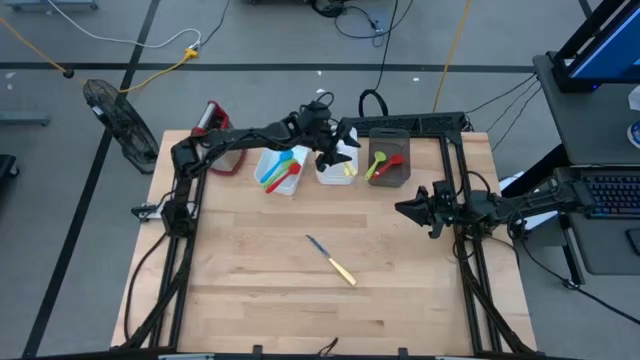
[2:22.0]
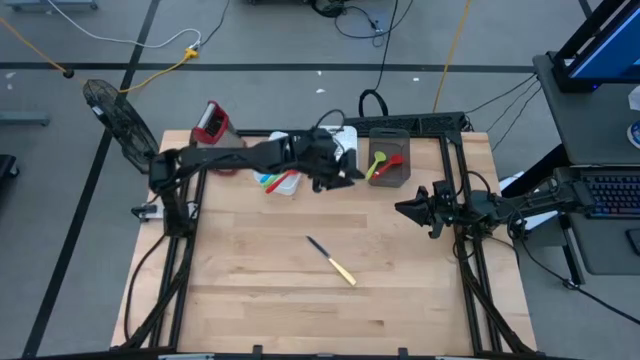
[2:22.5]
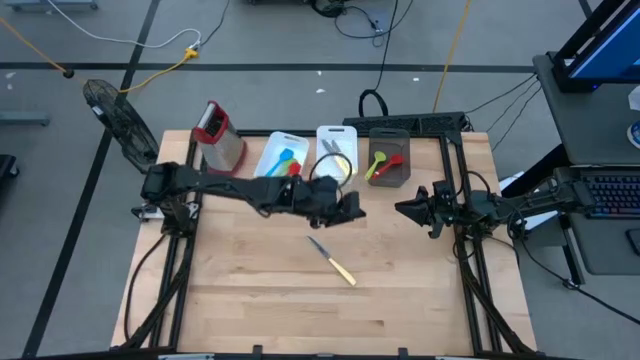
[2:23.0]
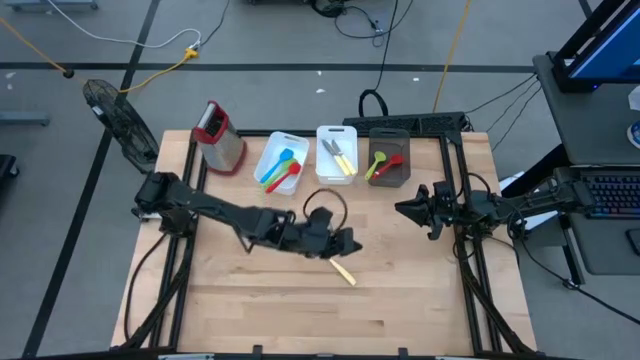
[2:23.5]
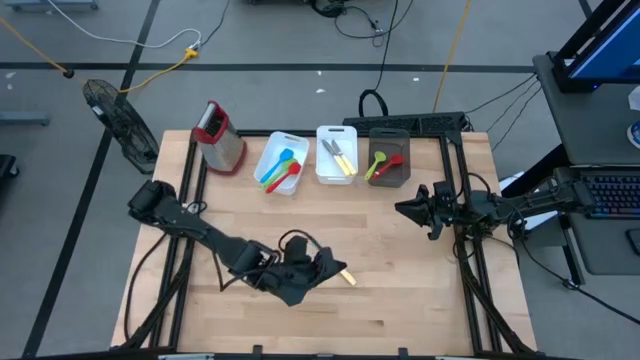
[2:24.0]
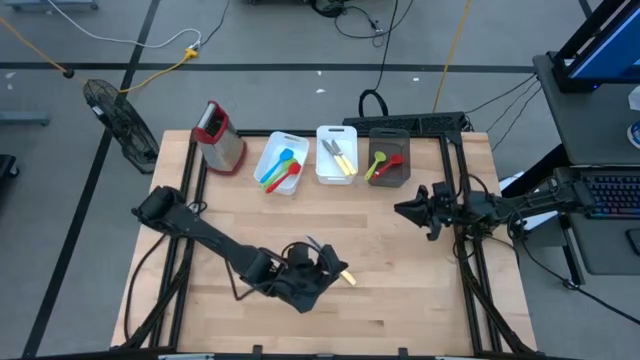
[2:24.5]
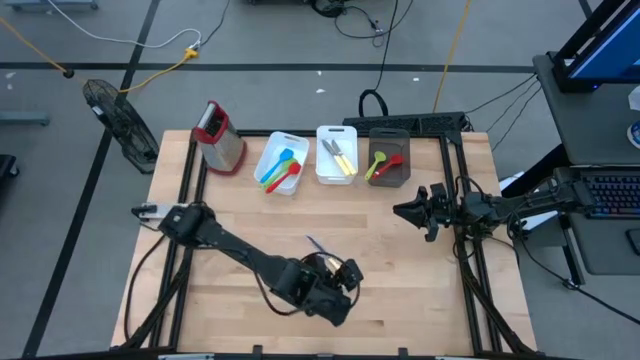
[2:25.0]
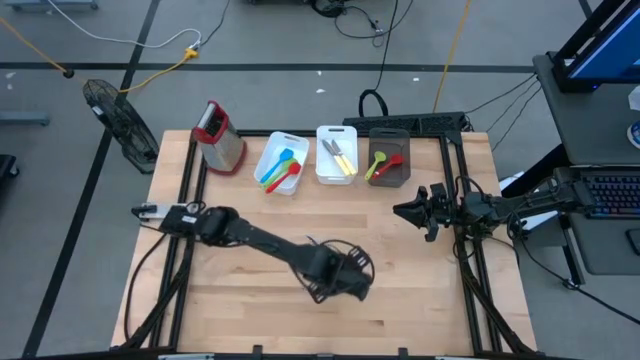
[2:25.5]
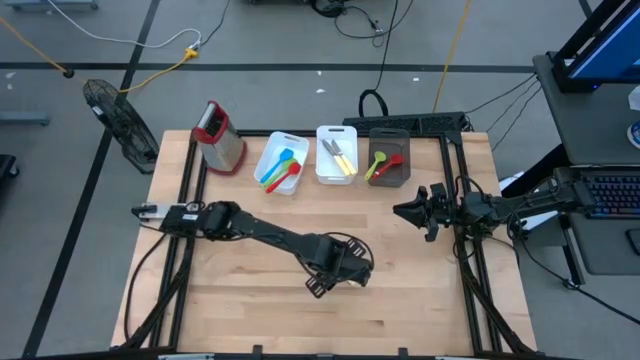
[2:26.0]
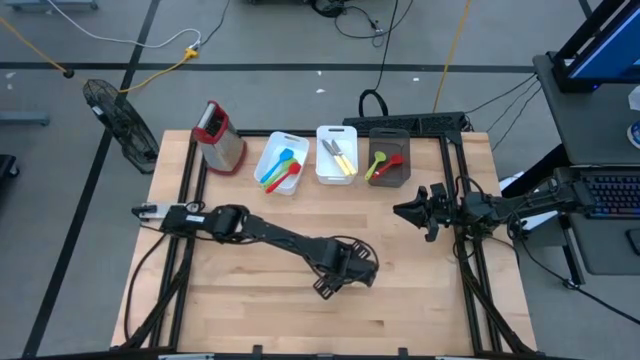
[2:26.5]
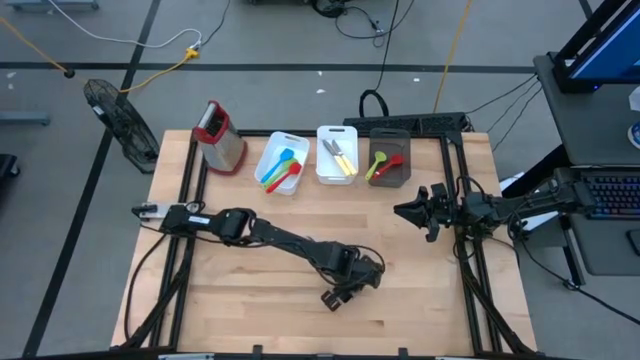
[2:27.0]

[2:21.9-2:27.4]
Task: Pick & Place Kitchen Items
Put the yellow knife into the right white bin

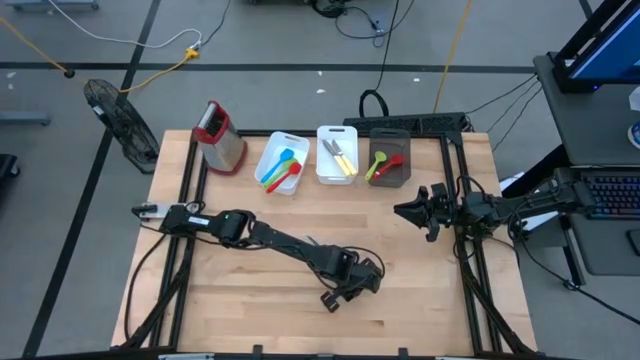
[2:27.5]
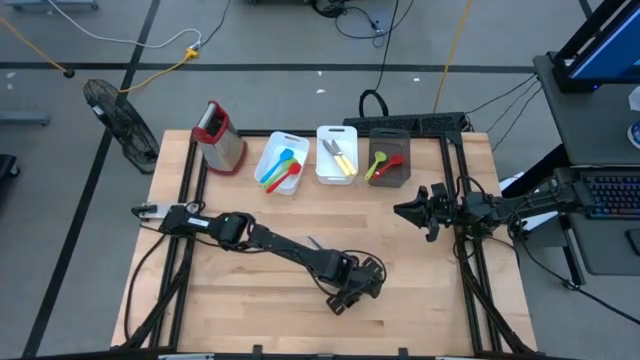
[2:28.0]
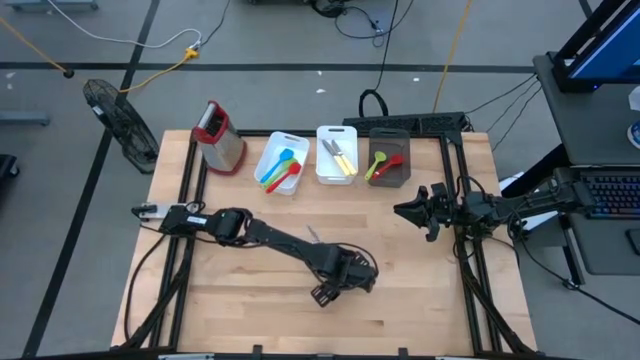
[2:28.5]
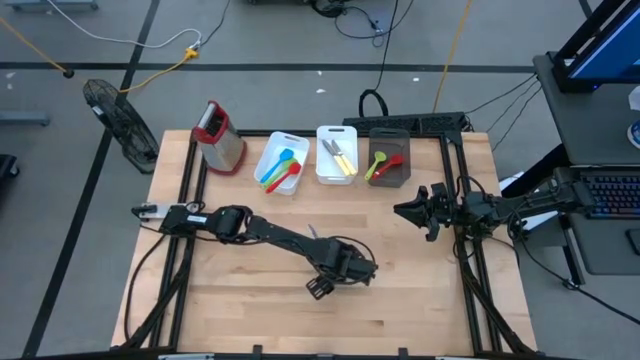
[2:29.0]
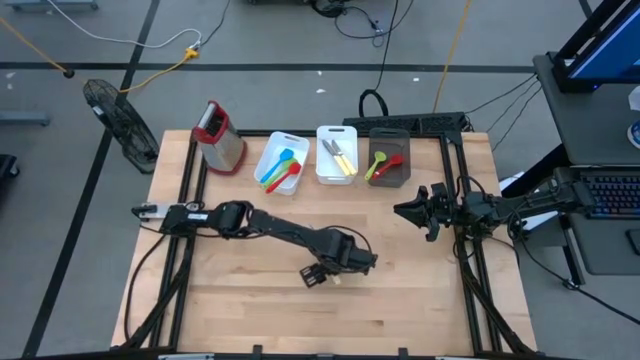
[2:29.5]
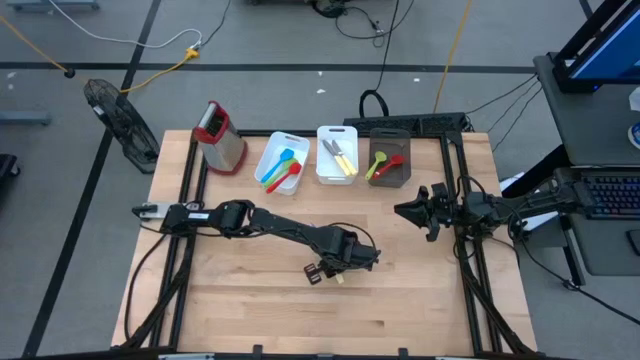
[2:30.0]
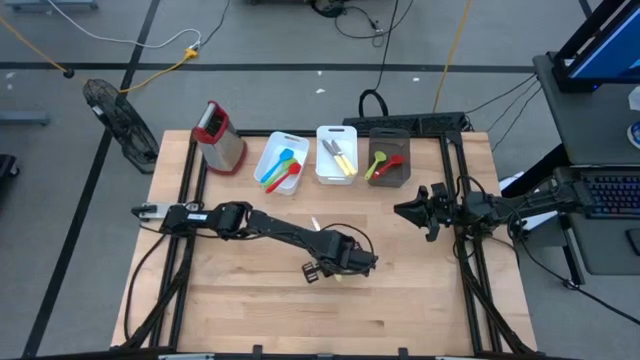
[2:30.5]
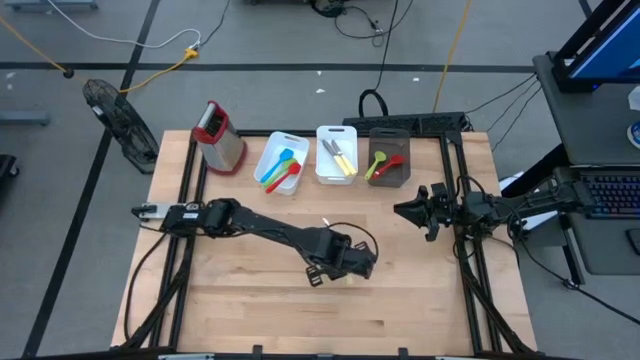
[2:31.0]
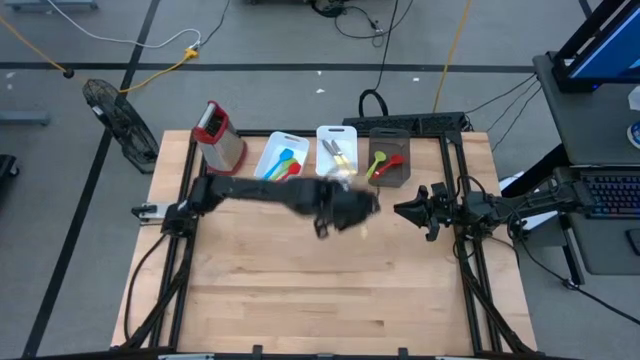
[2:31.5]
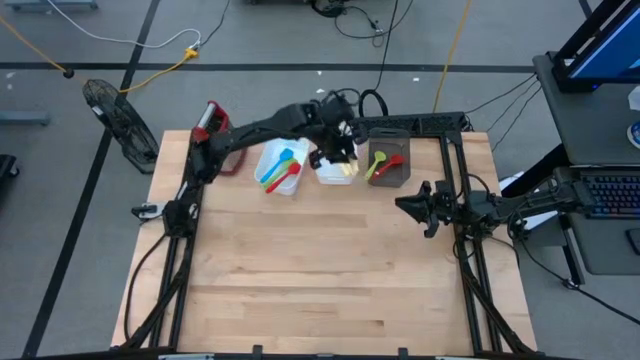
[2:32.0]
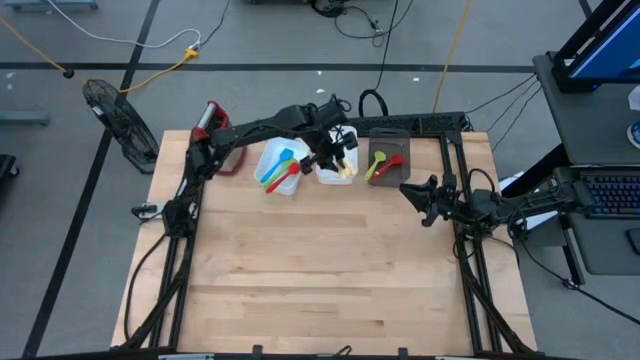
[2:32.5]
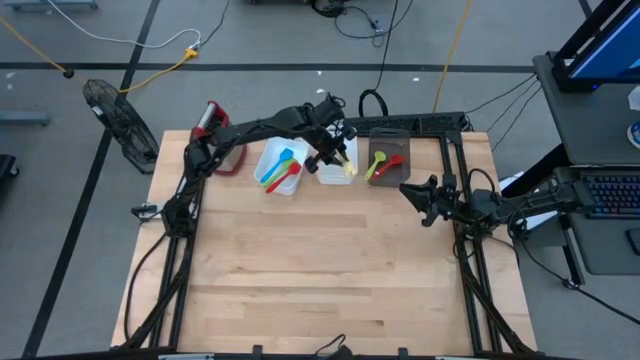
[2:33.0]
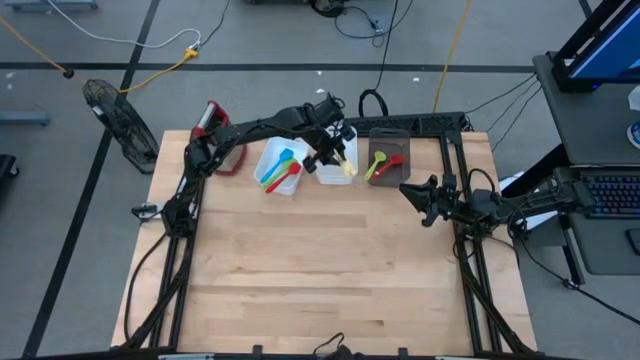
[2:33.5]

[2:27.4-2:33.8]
Put the yellow knife into the right white bin

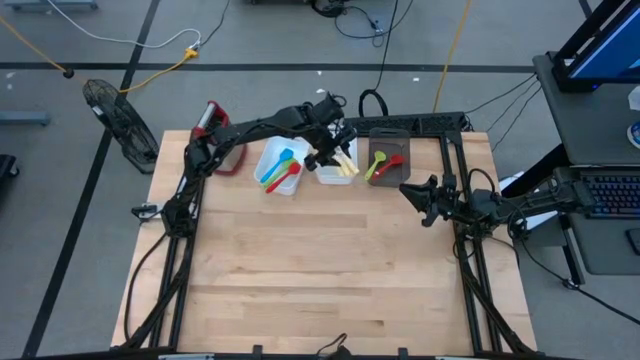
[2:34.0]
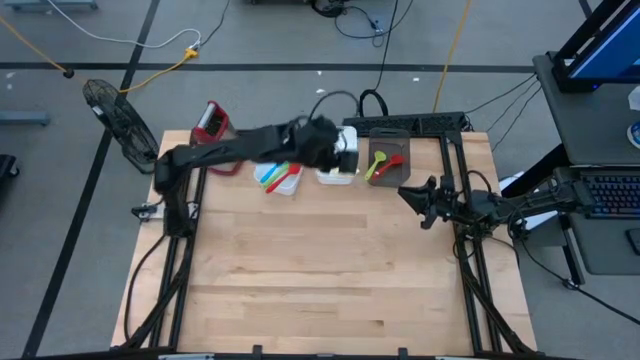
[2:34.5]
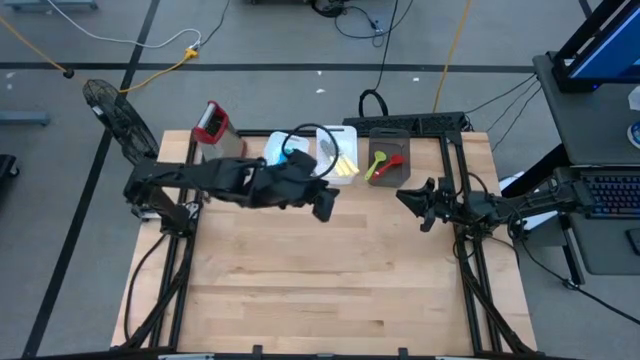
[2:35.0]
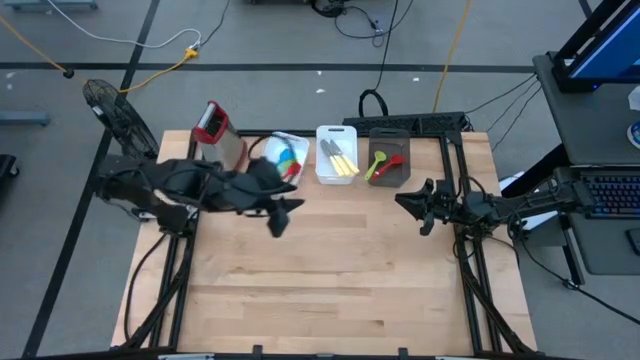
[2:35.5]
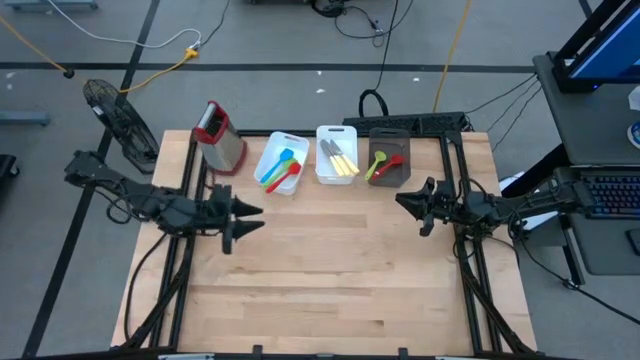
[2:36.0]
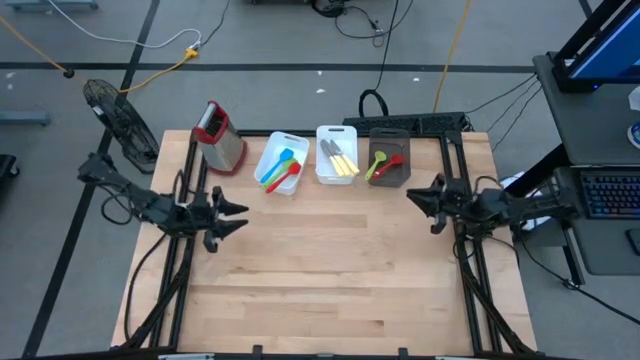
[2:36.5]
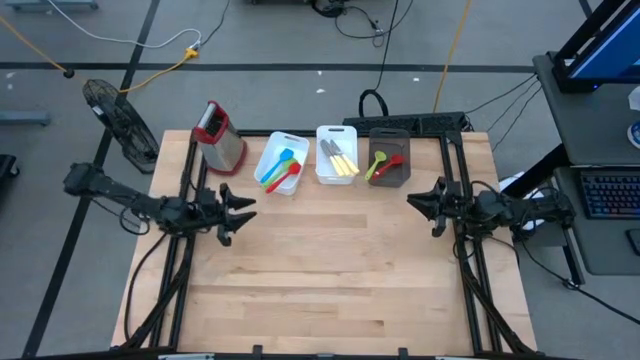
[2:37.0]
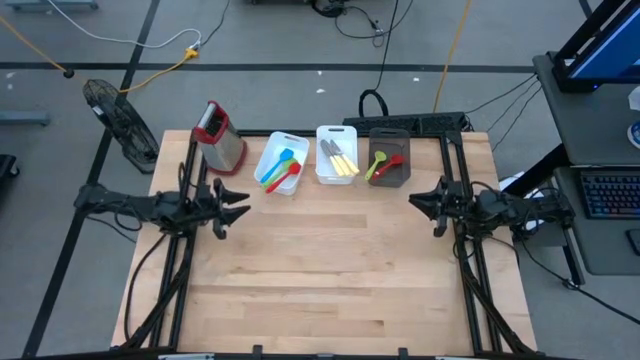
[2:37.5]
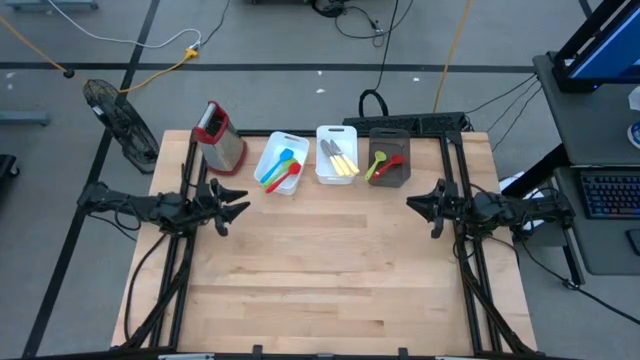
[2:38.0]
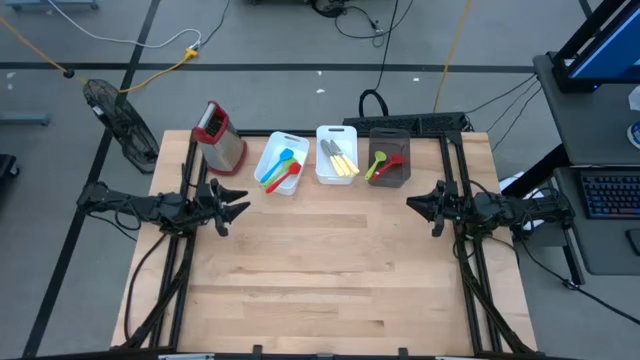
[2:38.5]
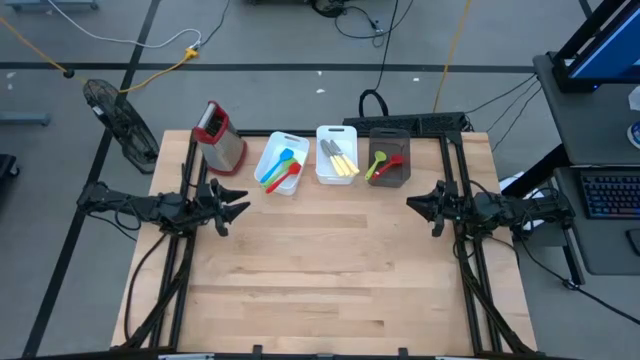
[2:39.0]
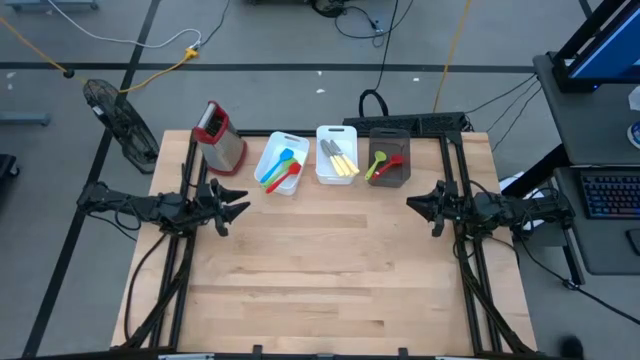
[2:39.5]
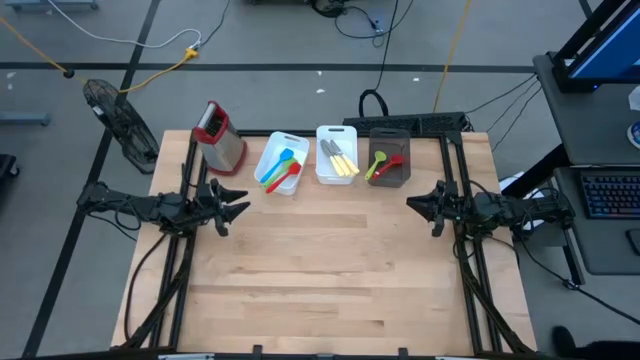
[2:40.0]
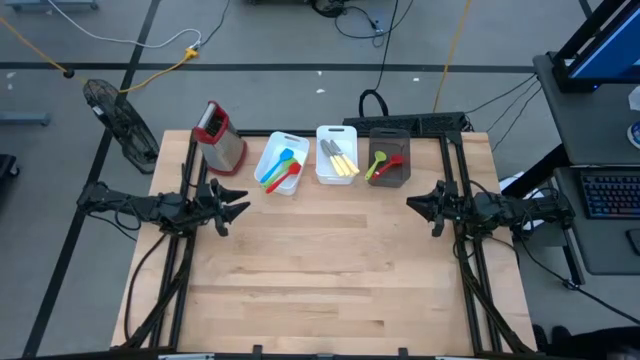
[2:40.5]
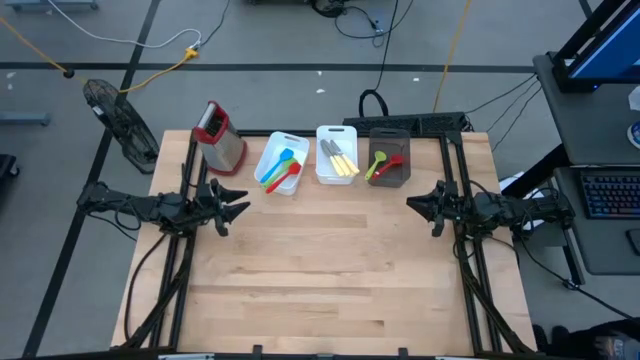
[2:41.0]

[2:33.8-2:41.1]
Return to Home Position

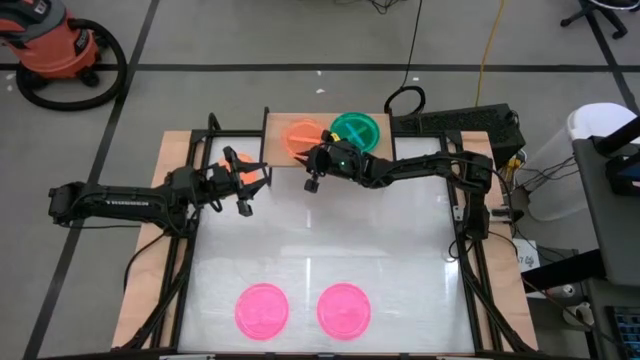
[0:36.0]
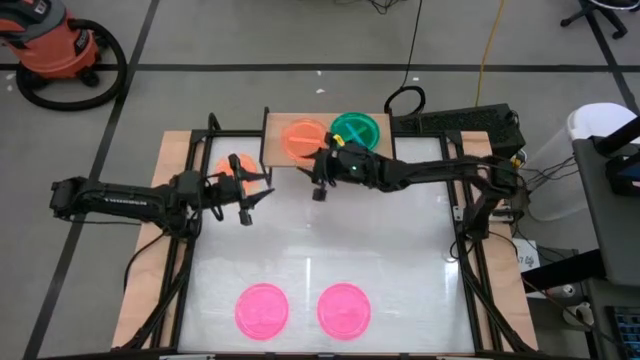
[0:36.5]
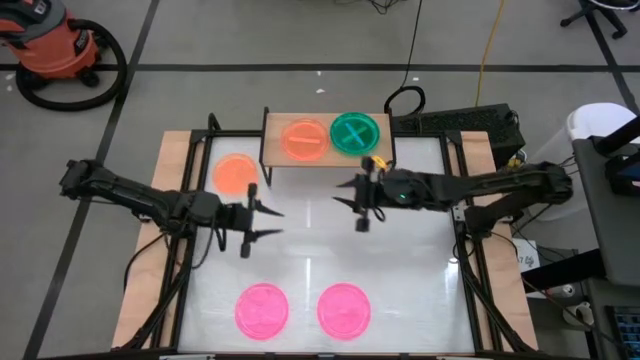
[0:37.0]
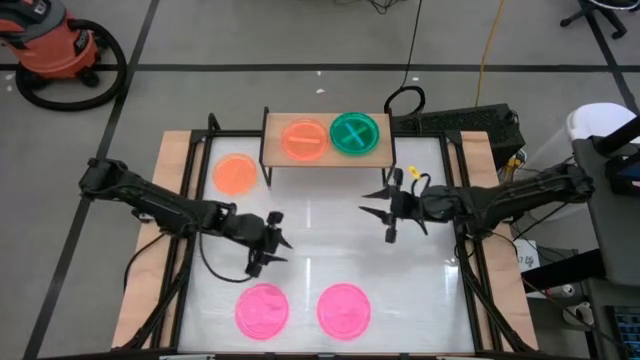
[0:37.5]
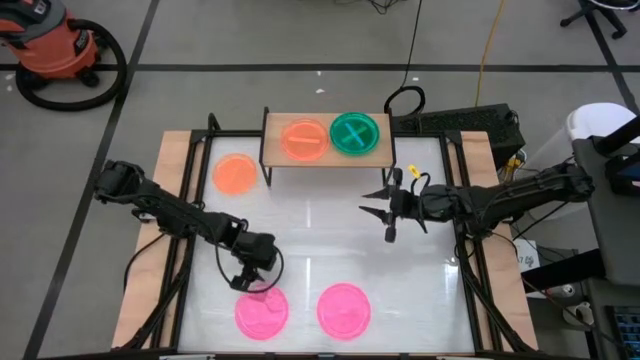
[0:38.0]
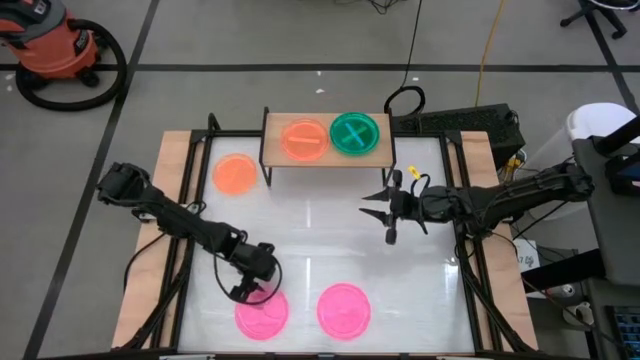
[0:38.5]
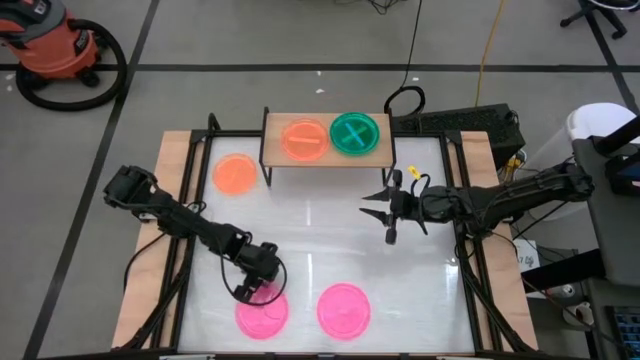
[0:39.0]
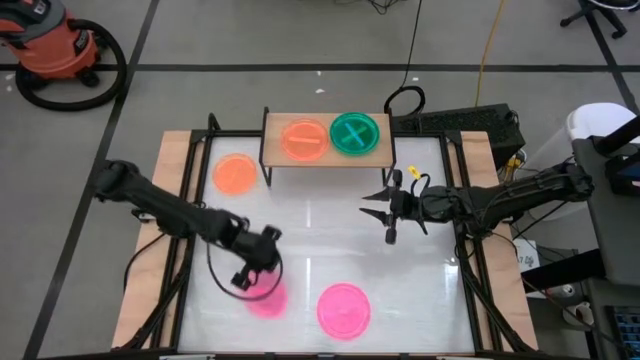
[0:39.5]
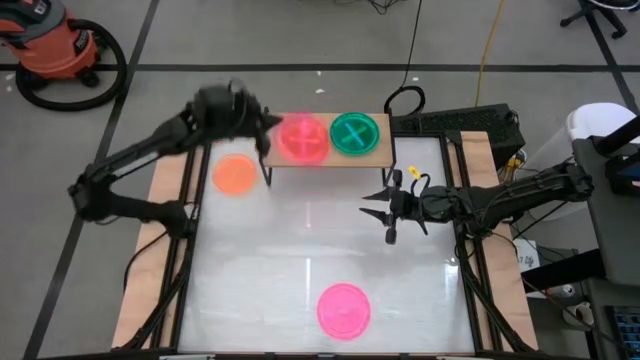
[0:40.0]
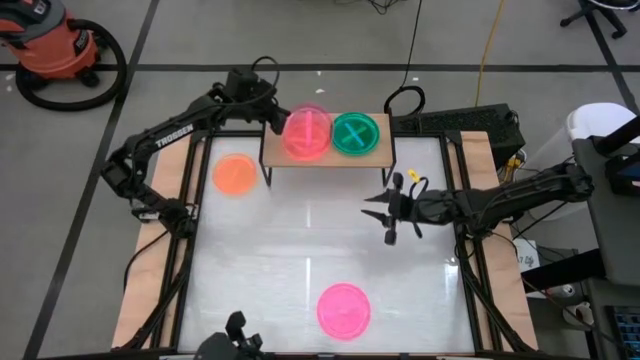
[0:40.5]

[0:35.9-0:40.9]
Task: Place and stack plates onto a shelf
Stack the left pink transparent plate on the orange transparent plate on the shelf
